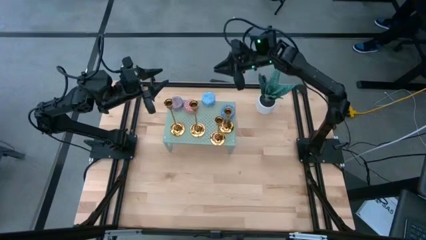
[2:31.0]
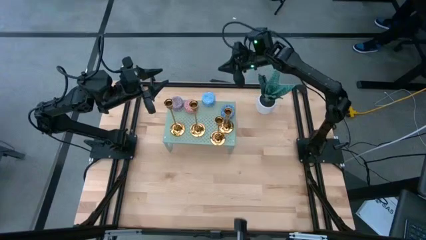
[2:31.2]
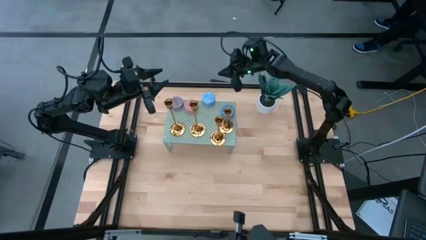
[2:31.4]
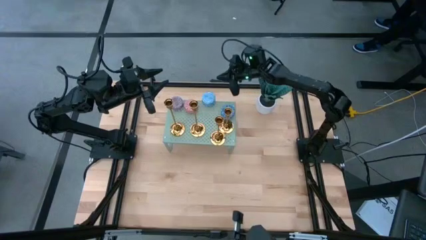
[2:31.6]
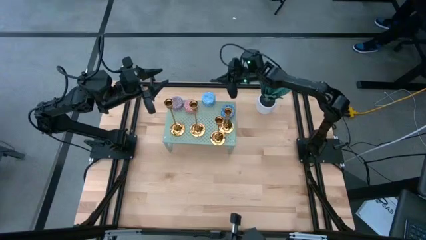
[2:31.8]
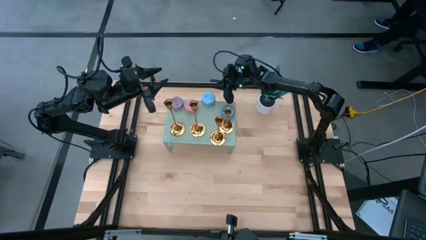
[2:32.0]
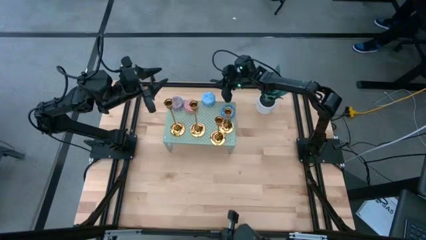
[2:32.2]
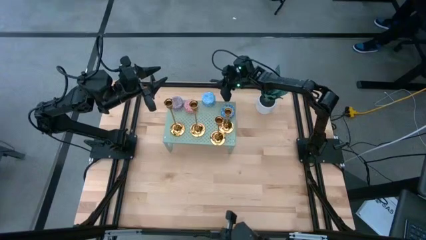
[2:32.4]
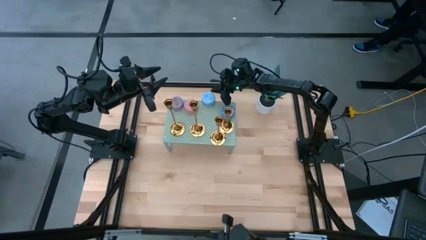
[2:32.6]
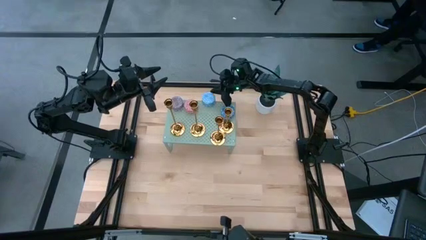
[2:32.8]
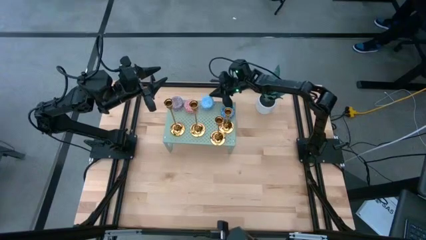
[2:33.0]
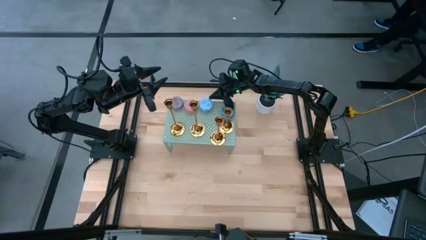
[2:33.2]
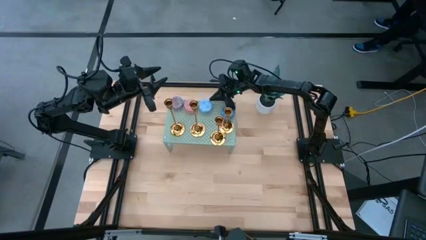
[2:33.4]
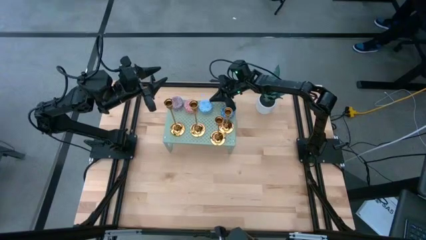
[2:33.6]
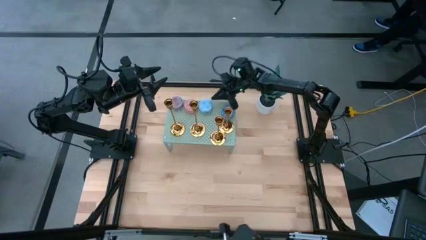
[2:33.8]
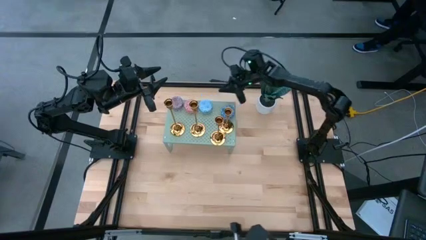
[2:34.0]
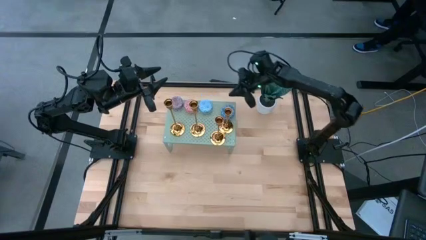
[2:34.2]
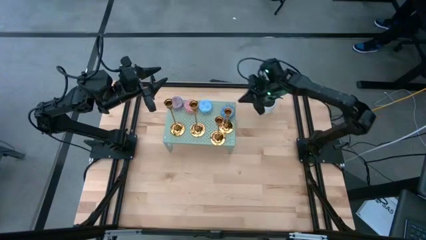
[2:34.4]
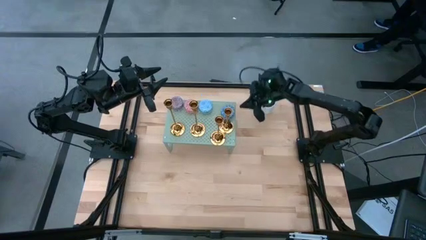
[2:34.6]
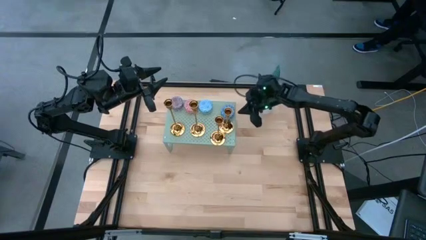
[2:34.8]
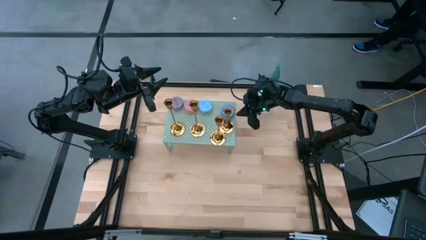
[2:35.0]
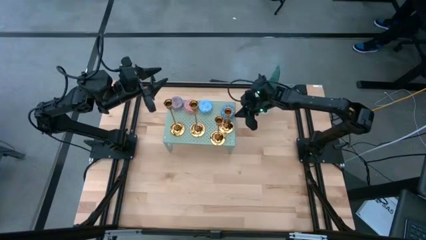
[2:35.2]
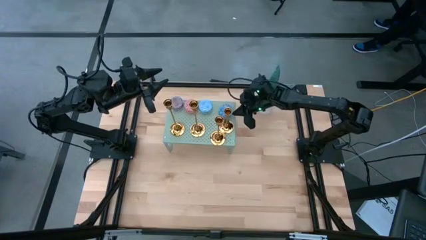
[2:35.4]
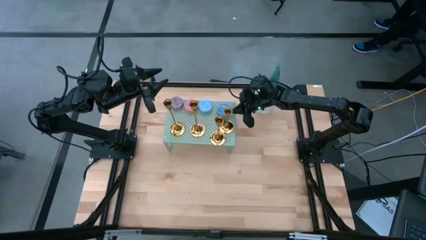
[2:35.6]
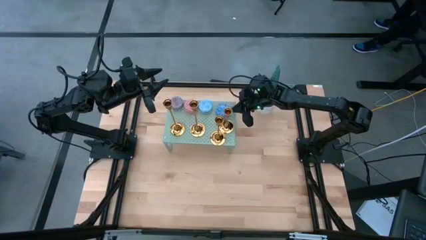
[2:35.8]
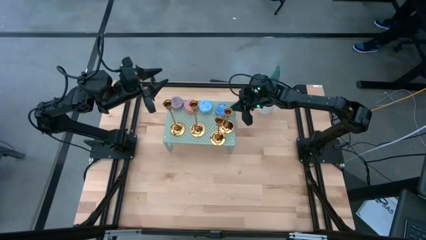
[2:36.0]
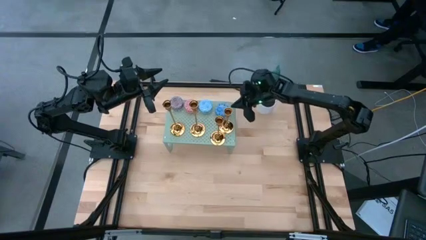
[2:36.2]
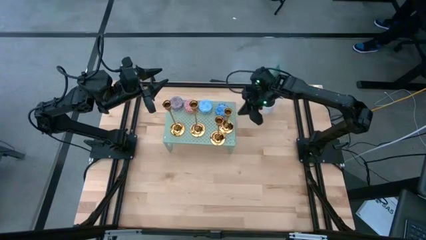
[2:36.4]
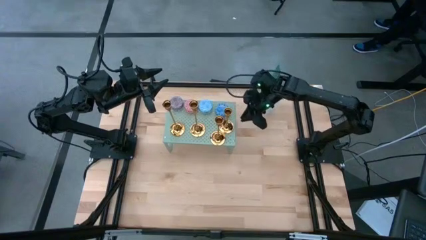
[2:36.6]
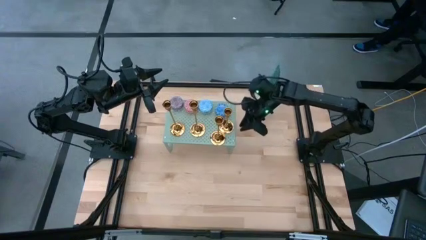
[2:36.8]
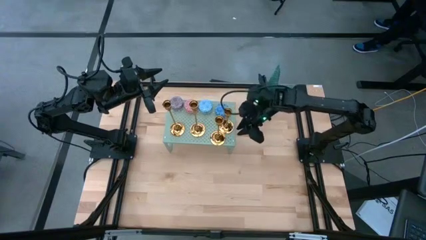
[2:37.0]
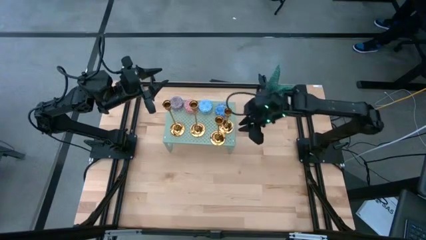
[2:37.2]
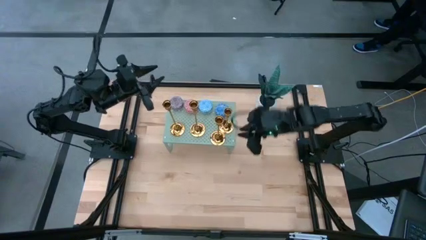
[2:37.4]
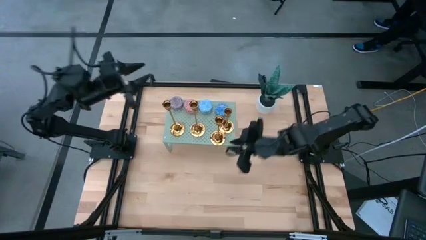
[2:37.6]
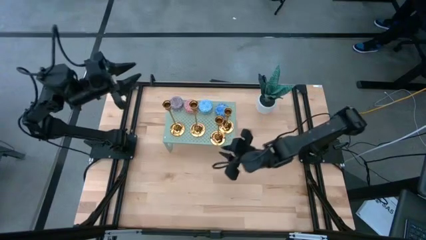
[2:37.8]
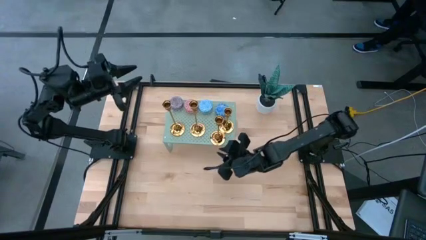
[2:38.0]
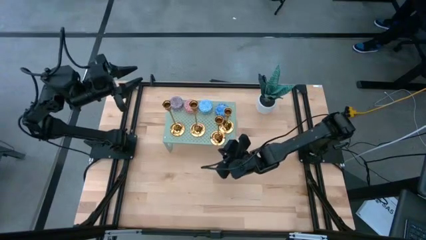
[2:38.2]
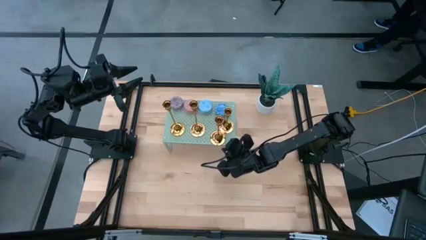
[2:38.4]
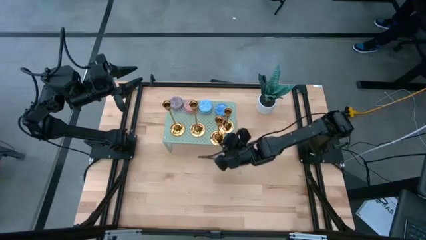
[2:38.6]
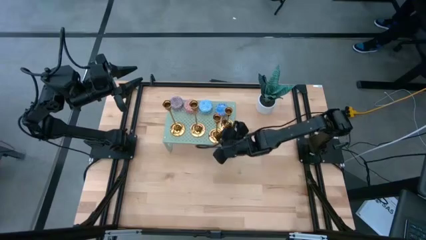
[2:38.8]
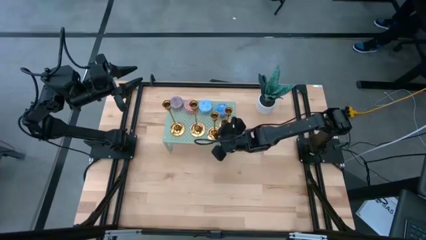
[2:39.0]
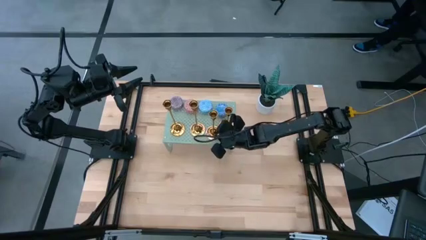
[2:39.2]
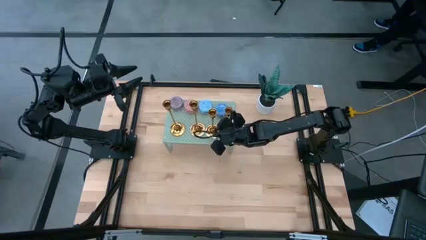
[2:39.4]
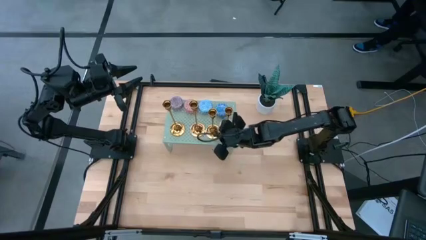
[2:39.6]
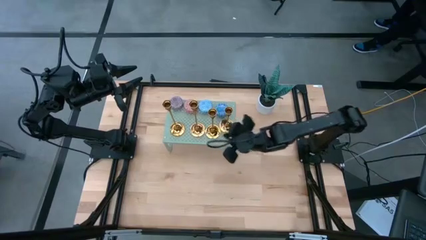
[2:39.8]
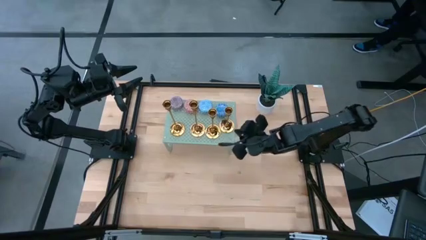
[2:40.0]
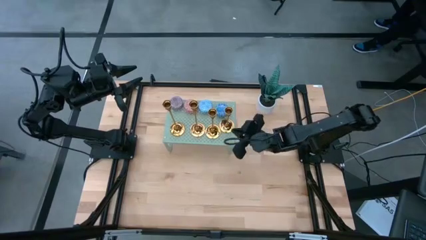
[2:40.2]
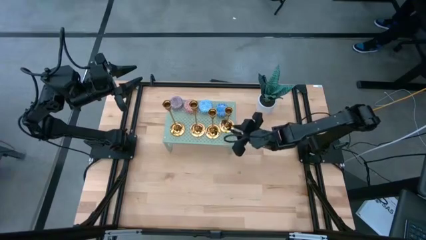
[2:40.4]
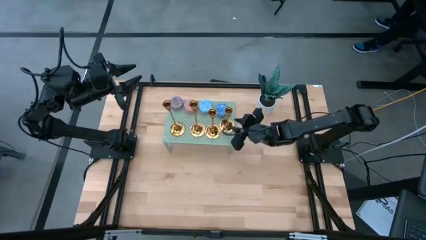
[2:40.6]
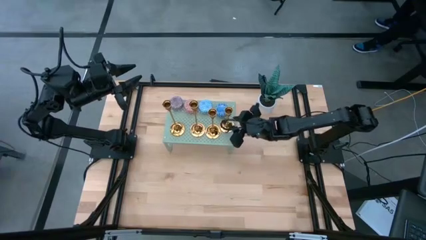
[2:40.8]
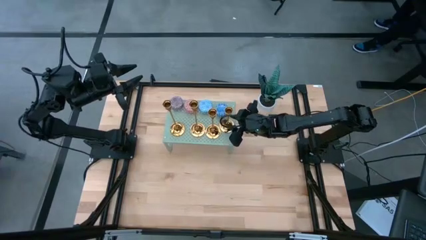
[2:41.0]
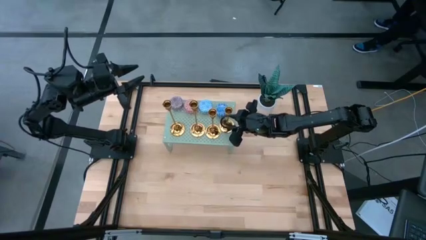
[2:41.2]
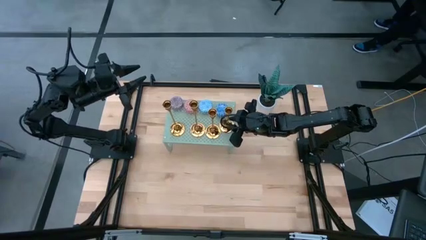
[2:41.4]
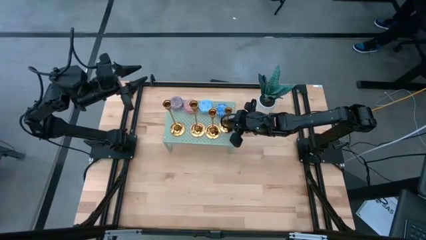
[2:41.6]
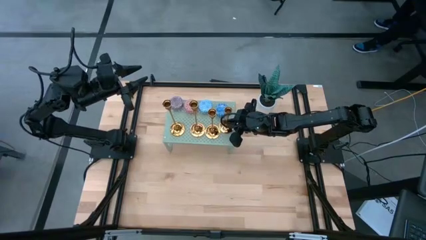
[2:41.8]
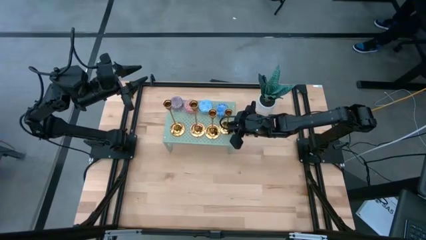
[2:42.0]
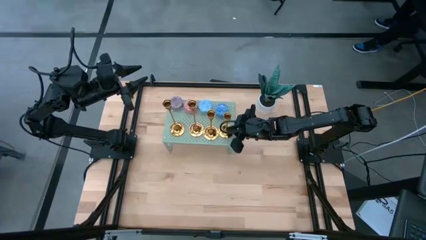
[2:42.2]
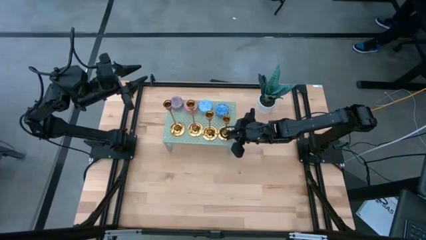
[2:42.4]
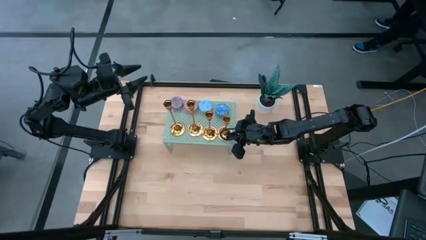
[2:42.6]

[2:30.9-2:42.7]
Task: Pick & Place candle stick holders
Adjust the gold candle holders and light blue scented candle on the shelf
